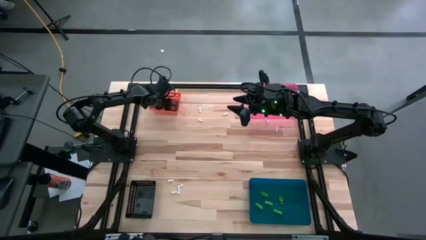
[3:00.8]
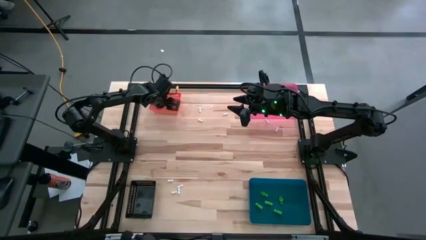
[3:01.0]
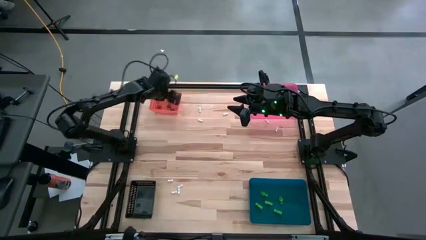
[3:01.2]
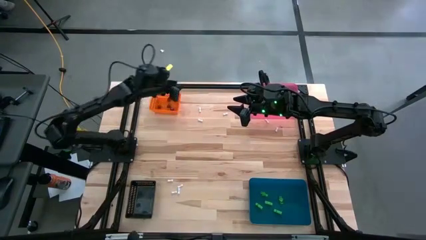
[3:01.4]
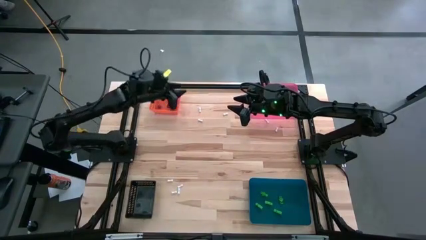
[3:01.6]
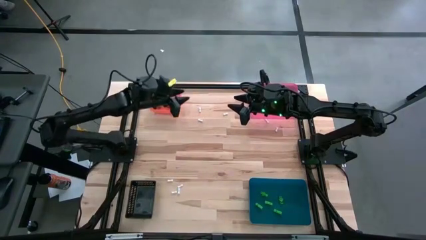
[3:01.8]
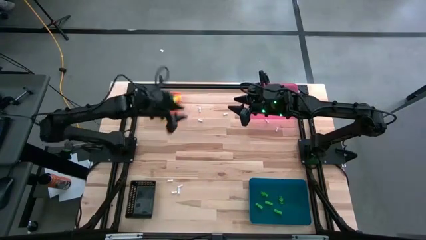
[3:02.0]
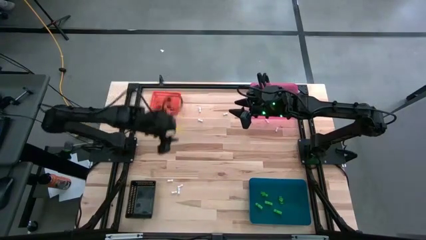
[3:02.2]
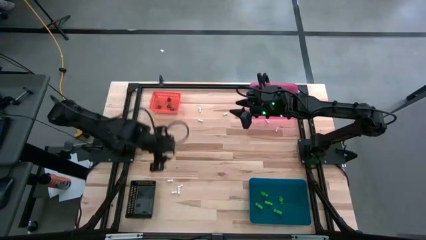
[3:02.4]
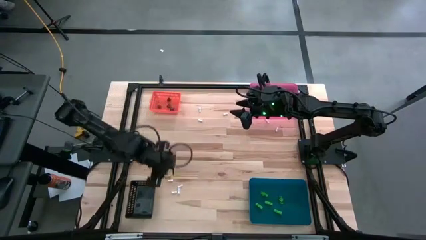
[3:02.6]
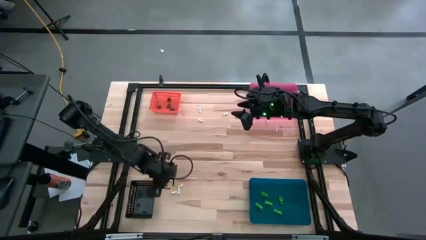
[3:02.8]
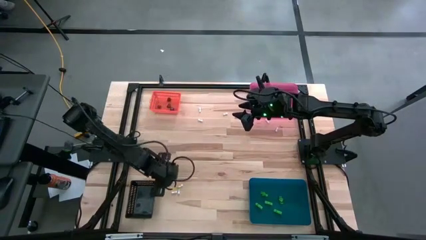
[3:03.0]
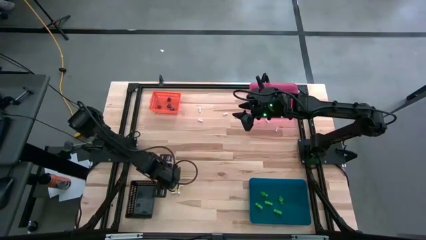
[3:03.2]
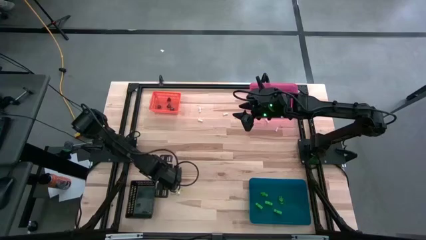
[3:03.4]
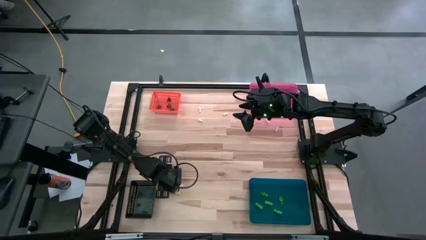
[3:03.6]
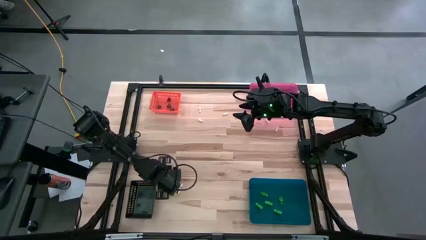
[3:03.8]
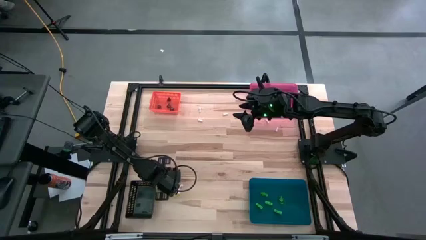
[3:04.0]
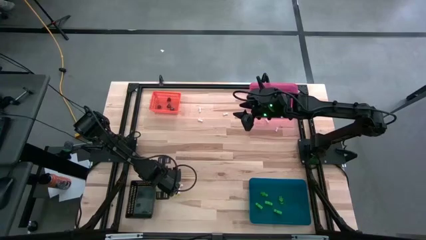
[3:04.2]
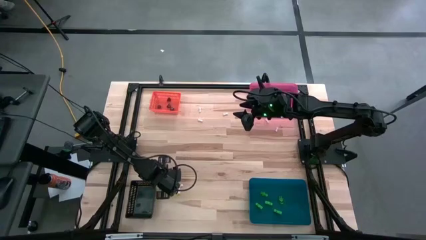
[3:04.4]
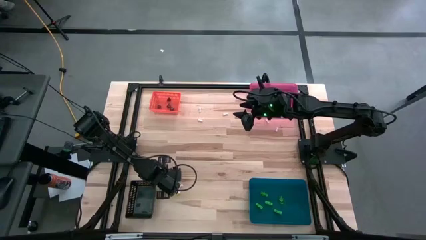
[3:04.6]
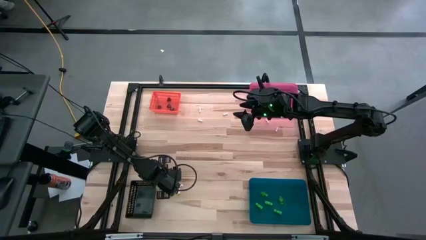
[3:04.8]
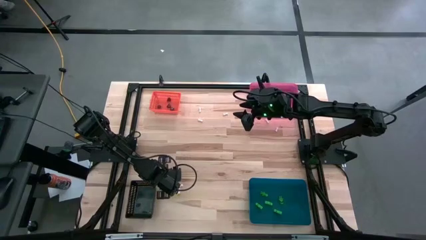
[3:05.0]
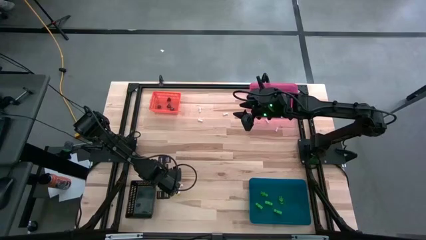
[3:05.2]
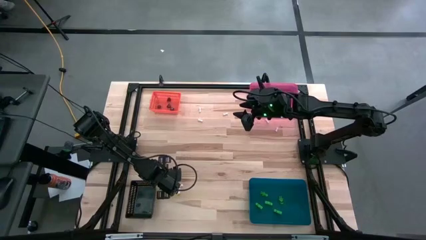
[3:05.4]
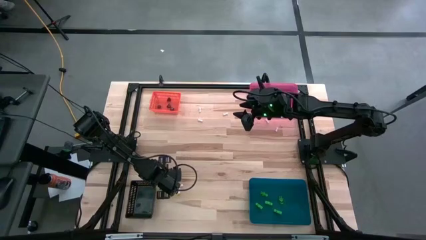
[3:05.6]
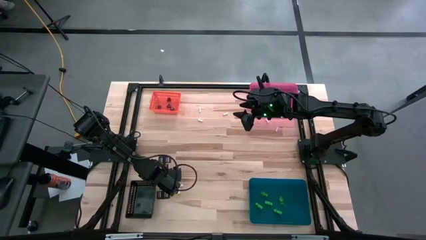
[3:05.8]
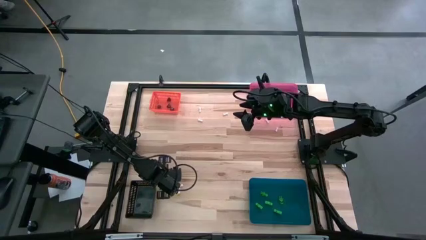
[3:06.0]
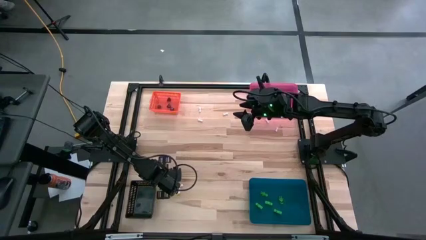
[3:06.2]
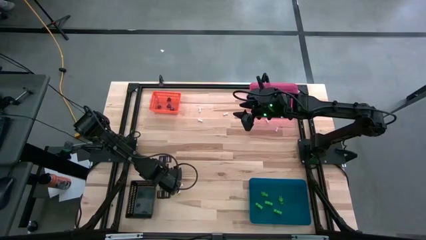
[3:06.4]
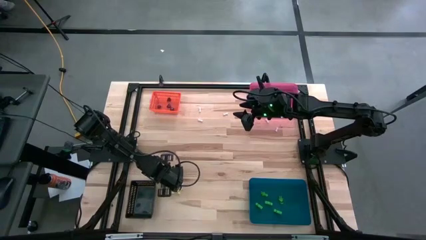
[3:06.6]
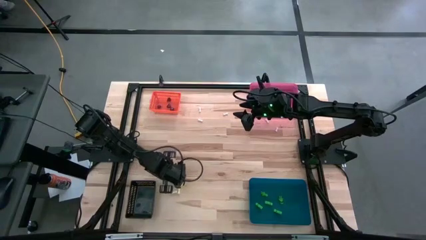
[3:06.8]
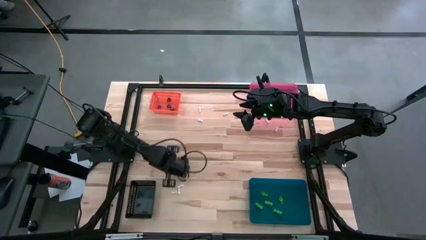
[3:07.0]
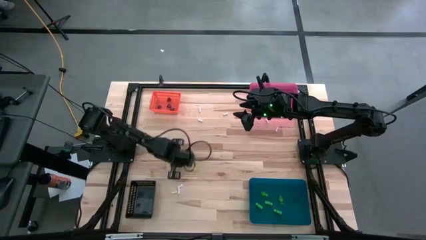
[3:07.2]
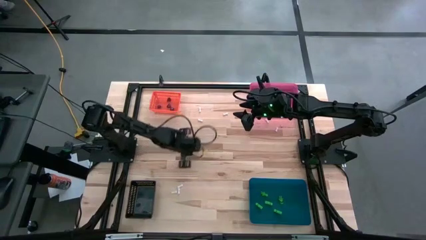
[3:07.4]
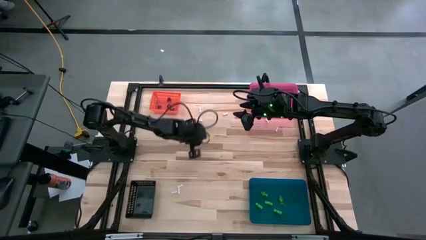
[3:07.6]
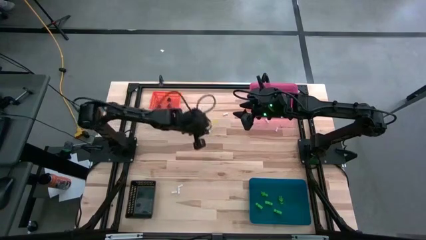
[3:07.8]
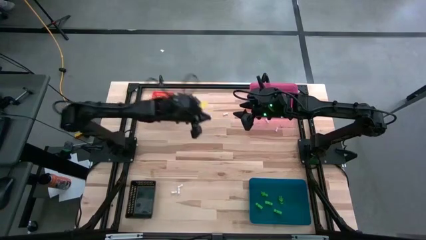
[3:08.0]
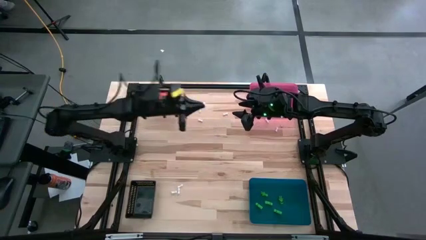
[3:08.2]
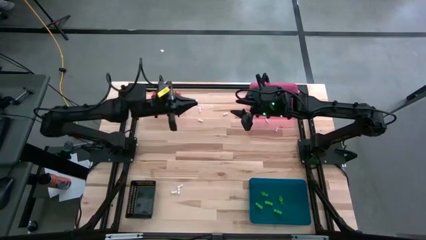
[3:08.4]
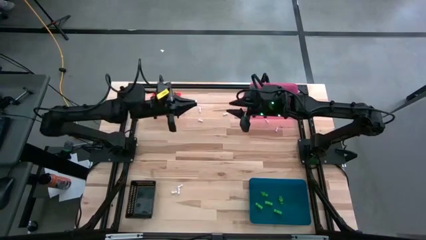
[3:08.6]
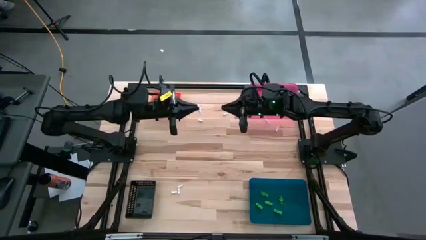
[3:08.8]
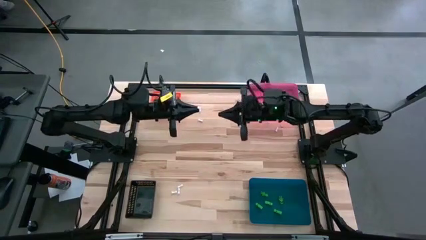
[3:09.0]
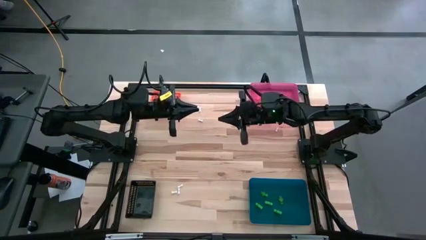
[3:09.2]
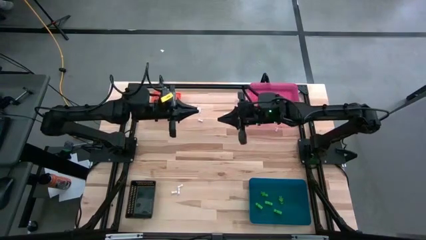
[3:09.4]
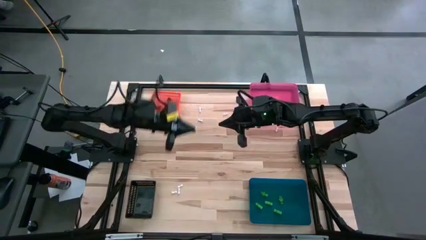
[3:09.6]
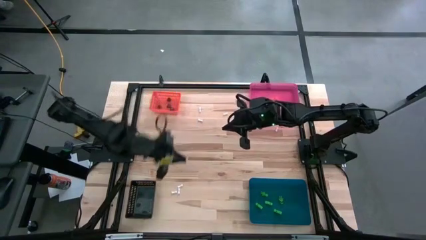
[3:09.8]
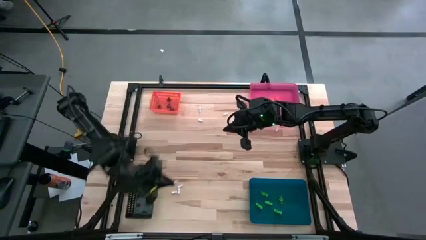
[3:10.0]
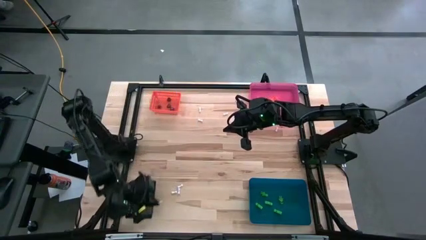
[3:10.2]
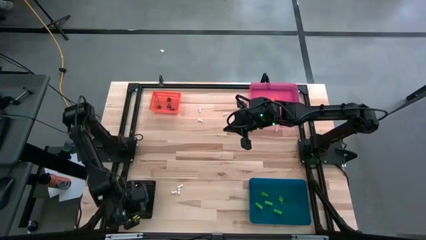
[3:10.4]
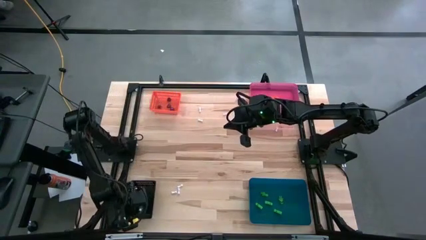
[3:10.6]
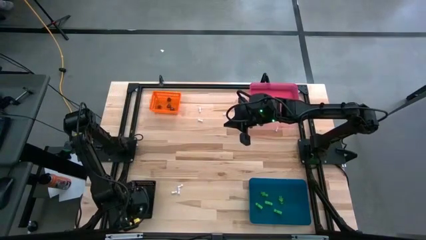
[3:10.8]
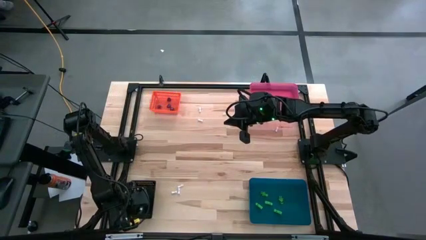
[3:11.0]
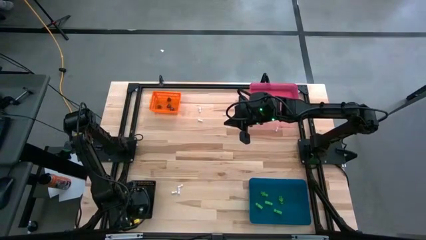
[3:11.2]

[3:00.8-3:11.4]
Task: Sort Halloween decoration
Put the white bone toy into the black bin

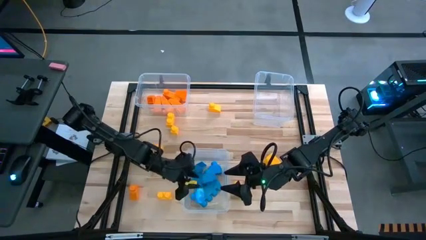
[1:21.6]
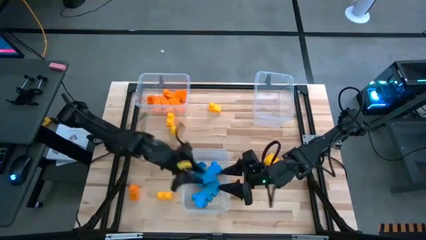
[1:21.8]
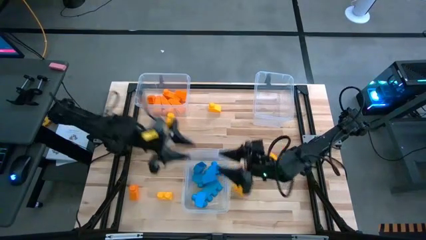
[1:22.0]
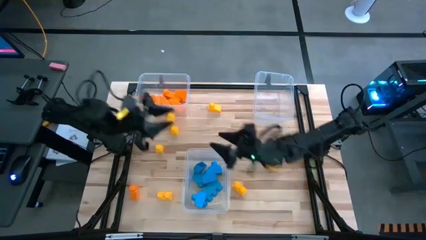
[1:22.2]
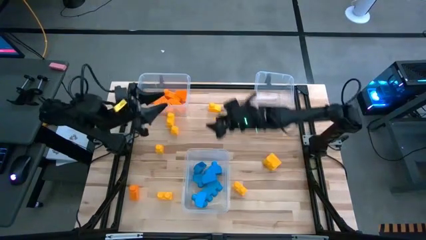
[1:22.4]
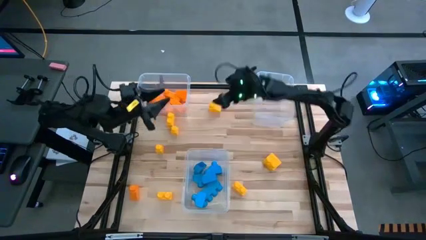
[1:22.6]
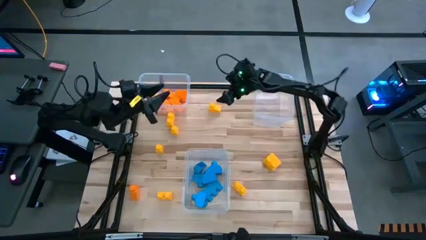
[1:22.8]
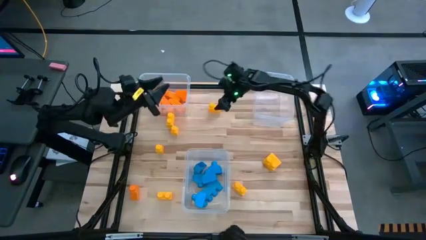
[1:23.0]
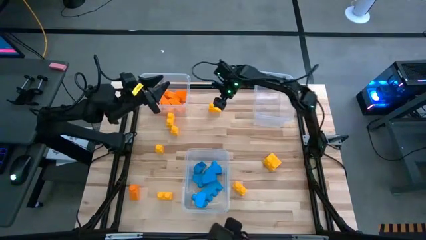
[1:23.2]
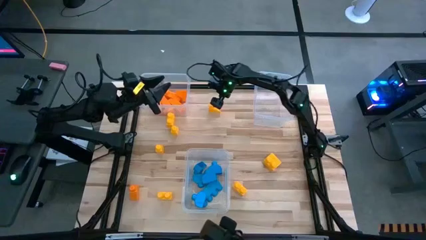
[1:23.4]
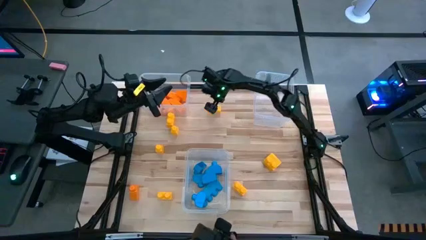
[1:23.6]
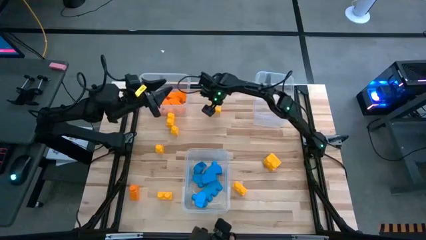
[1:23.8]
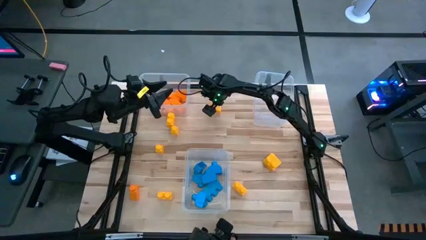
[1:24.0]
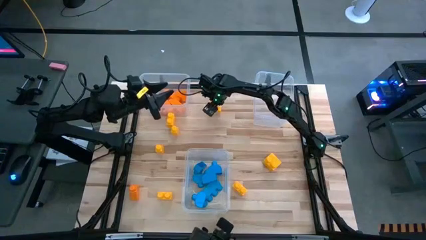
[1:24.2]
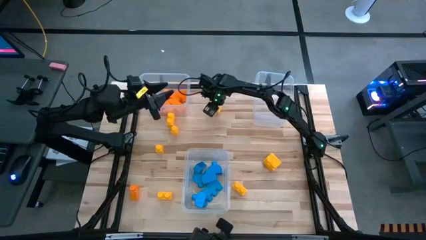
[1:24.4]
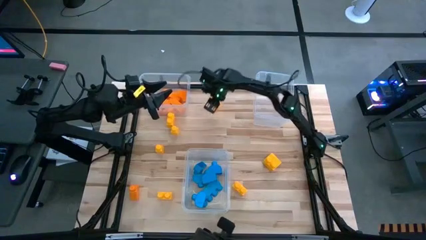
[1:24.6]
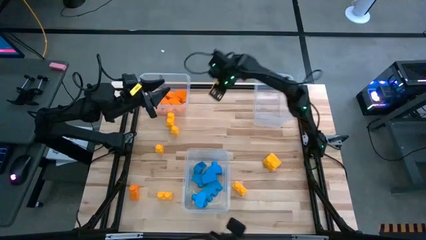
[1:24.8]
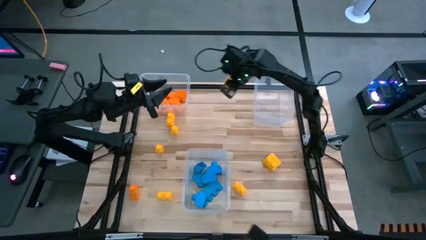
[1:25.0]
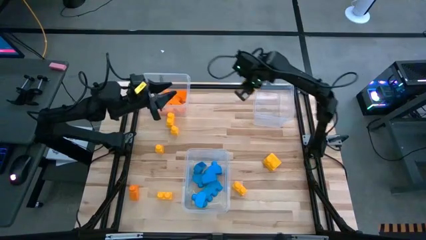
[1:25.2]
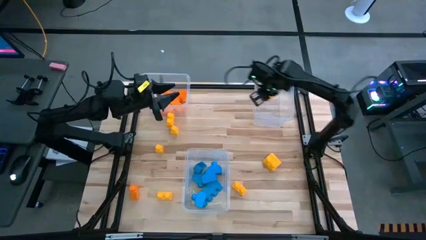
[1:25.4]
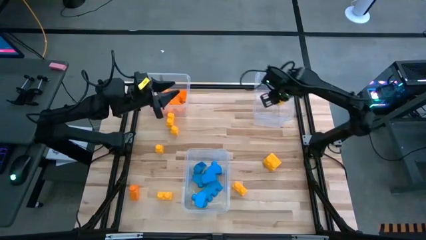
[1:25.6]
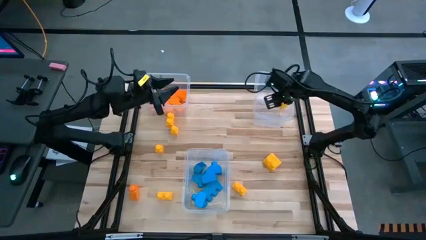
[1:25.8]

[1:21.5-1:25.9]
Task: Sort blocks
Put the yellow game piece into the top right transparent bin

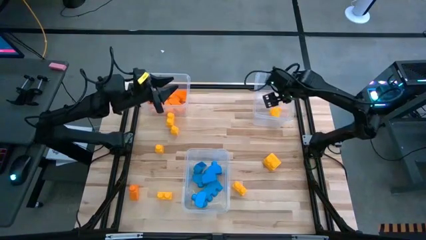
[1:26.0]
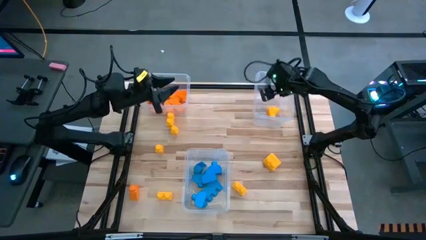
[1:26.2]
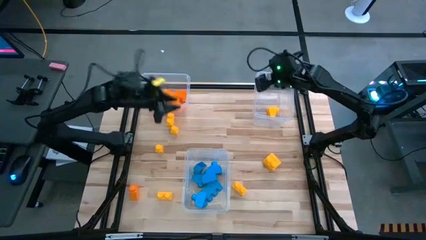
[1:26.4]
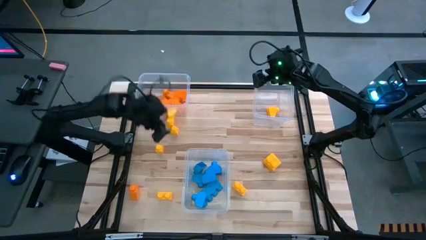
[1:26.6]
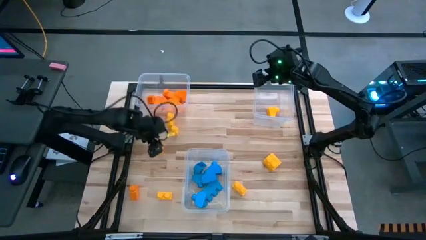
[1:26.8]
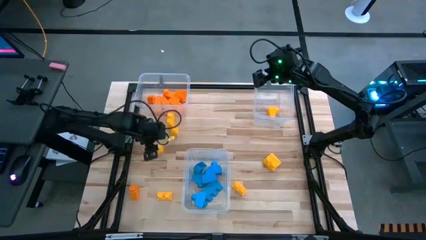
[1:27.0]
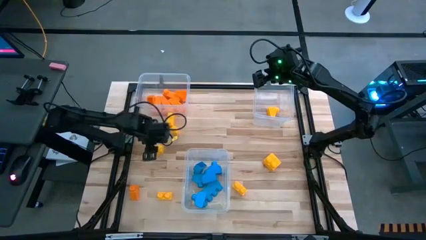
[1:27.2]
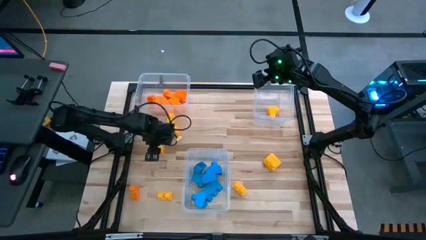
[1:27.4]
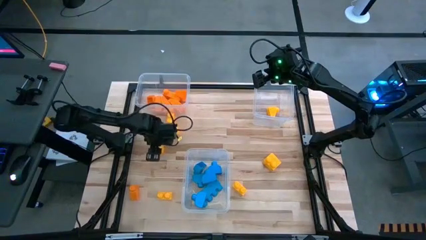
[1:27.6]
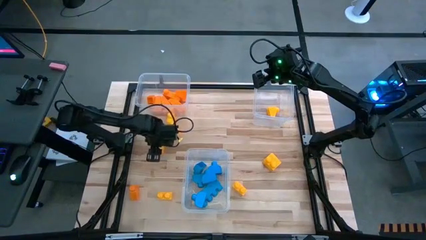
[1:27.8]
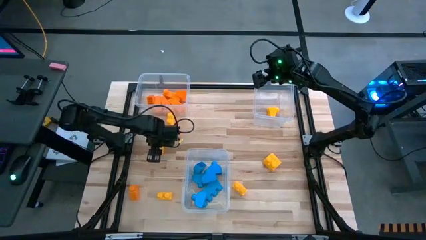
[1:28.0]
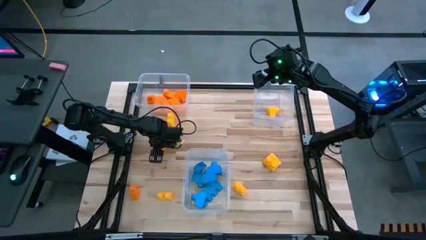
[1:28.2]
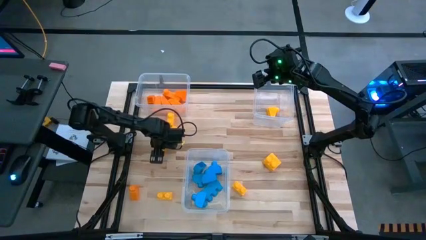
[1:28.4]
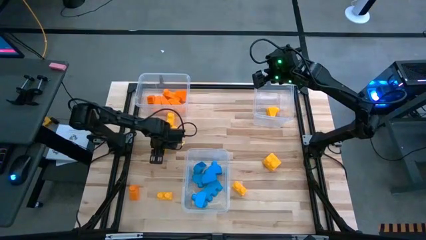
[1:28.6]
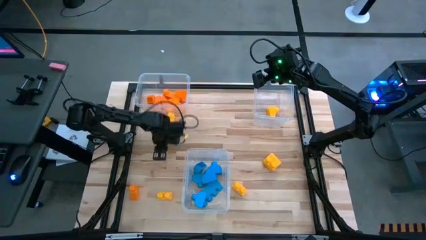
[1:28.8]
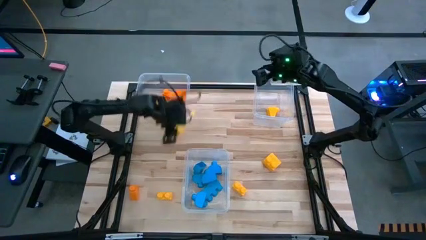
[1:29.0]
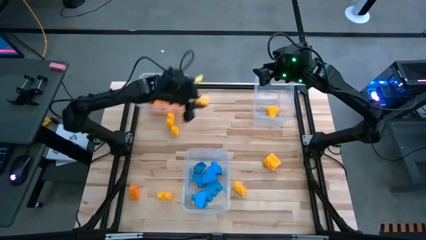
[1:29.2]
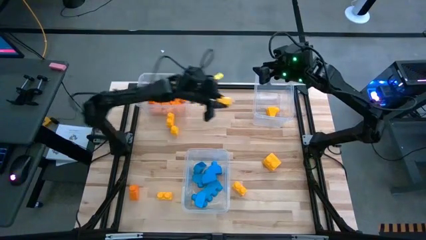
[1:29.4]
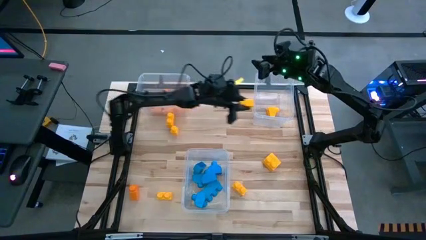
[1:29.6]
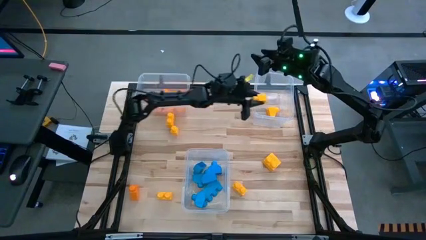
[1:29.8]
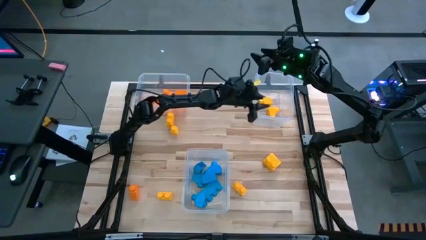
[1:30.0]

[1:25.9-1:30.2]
Put the yellow game piece into the top right transparent bin
